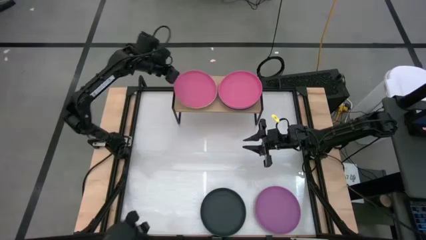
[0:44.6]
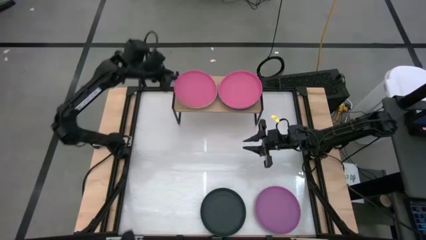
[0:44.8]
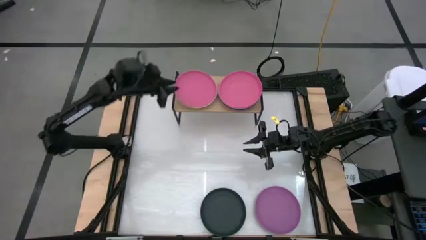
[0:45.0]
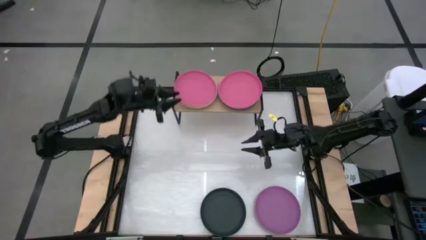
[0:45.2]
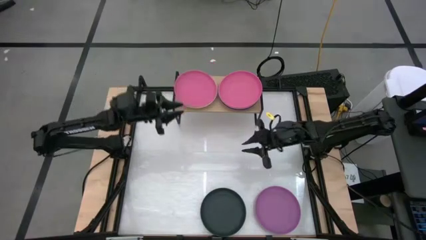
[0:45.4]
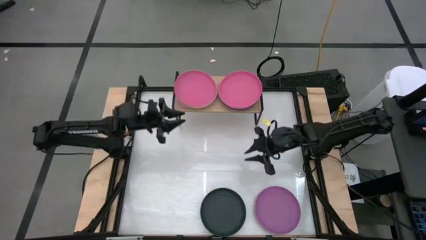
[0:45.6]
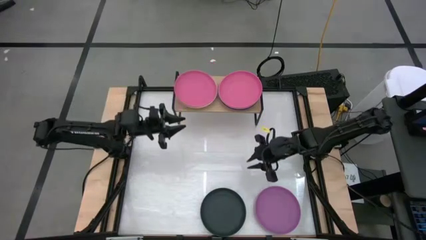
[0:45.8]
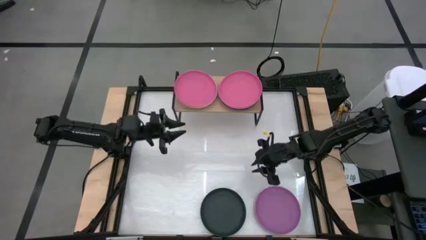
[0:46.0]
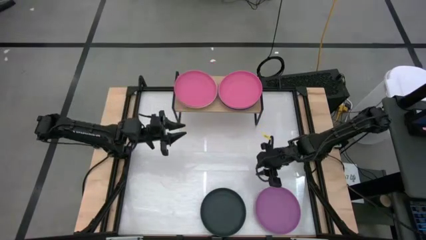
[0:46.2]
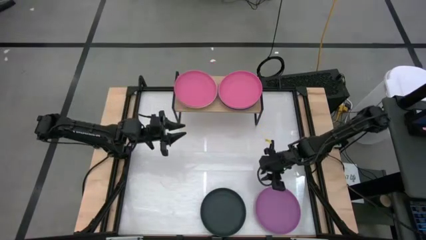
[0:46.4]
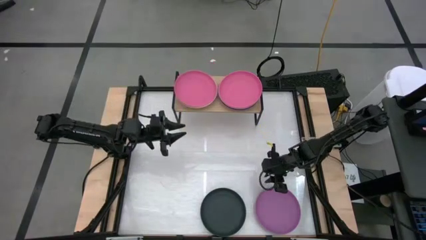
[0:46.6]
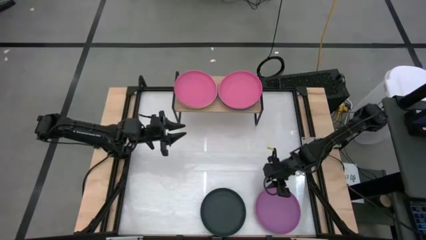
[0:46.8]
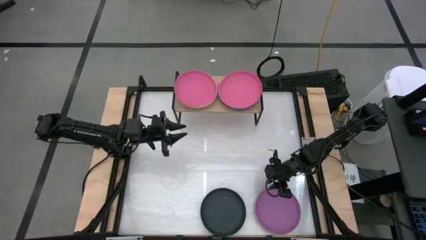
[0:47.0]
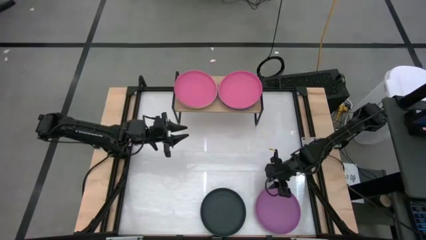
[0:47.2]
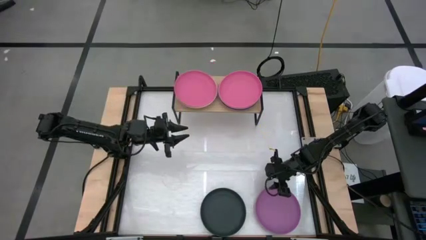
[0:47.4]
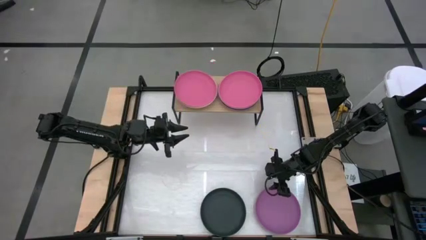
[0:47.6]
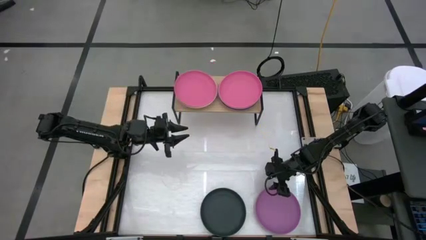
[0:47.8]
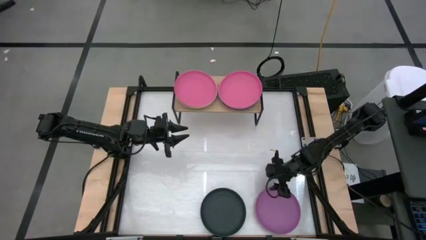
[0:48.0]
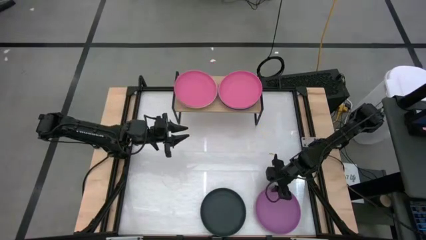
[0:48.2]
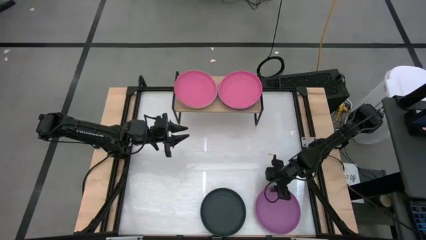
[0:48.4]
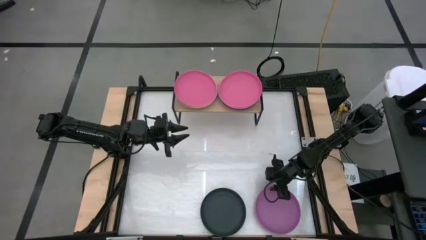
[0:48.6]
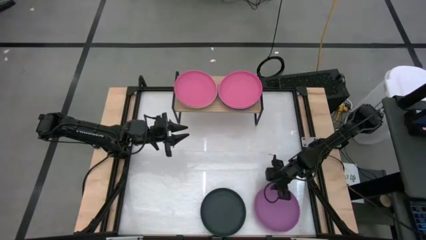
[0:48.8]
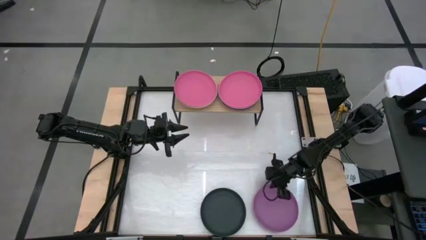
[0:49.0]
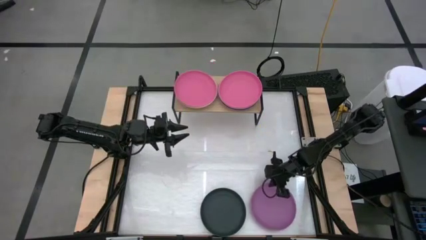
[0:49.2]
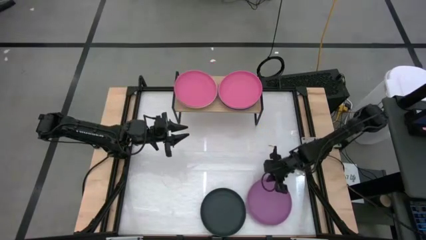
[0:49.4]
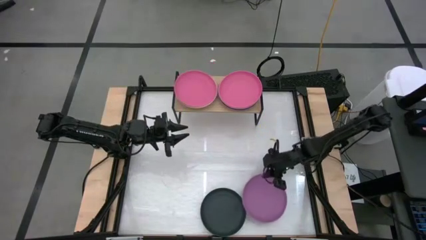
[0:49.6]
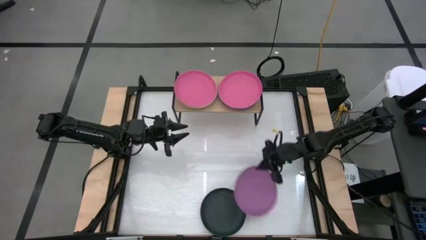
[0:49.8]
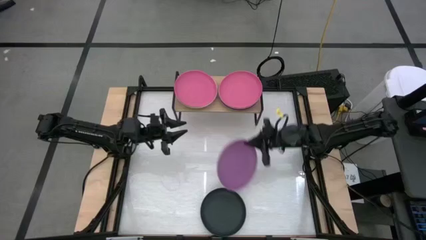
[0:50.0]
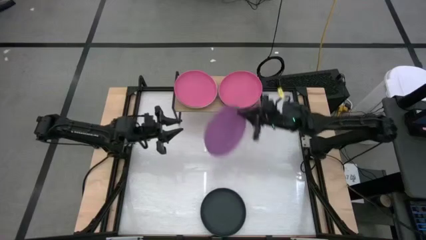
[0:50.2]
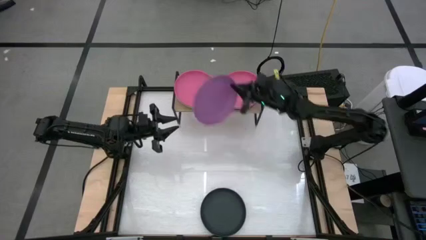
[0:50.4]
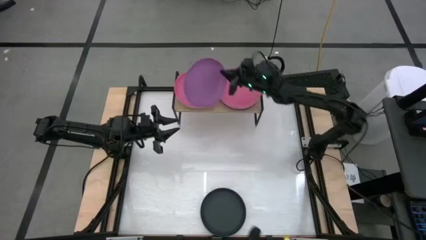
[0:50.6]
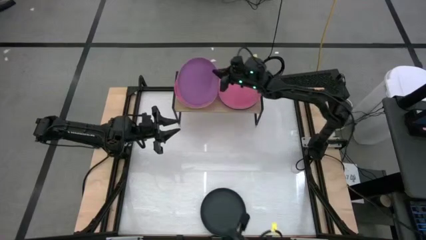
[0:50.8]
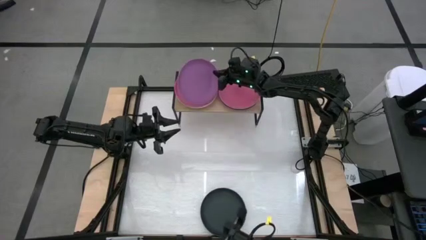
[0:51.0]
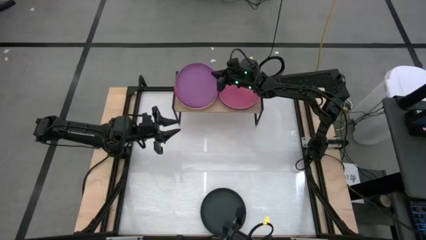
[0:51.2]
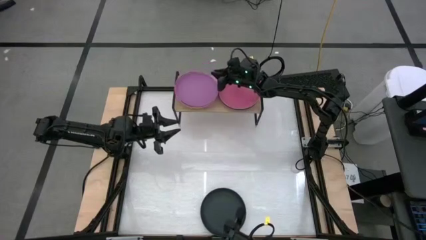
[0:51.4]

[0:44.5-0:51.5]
Task: Place and stack plates onto a shelf
Stack the violet plate on top of the left pink plate on the shelf

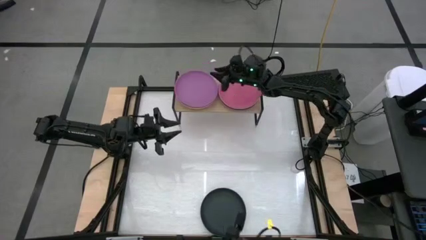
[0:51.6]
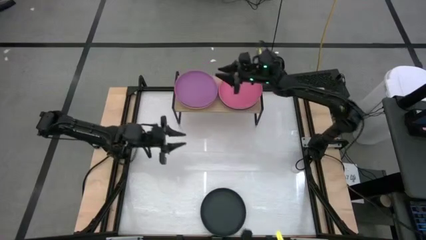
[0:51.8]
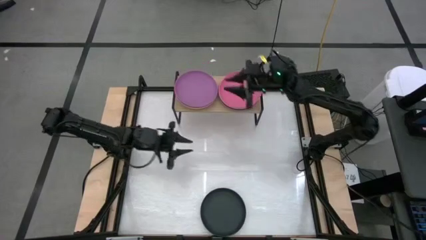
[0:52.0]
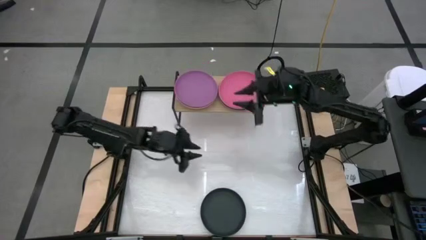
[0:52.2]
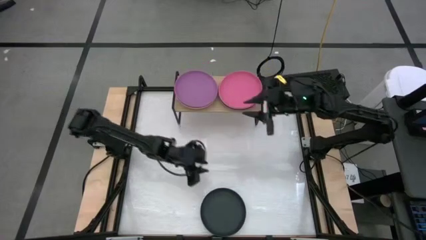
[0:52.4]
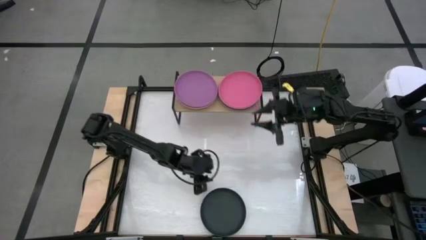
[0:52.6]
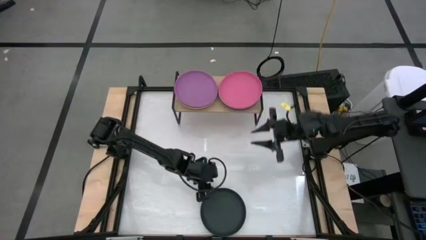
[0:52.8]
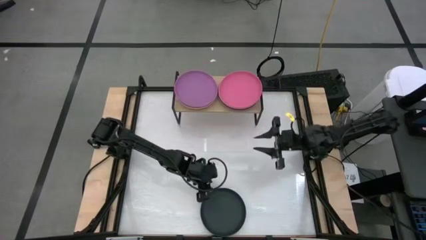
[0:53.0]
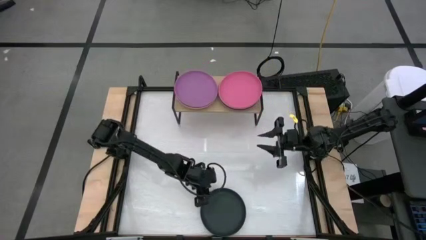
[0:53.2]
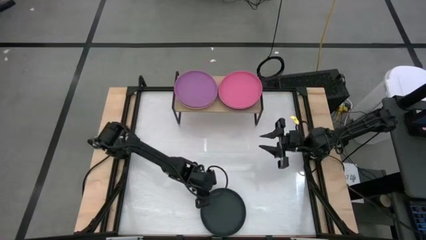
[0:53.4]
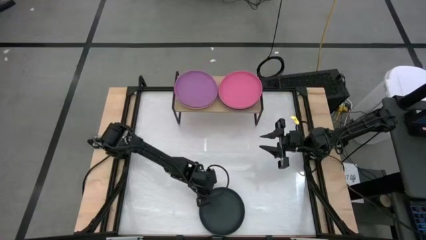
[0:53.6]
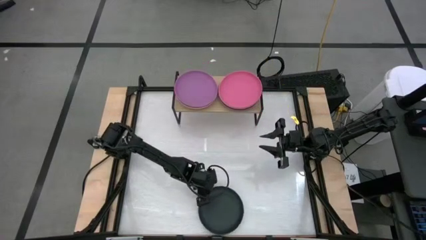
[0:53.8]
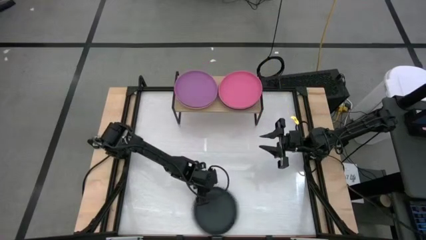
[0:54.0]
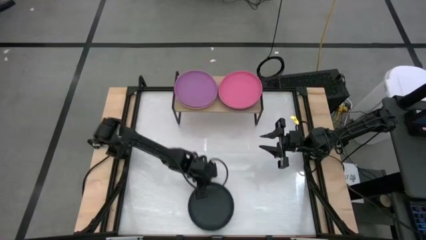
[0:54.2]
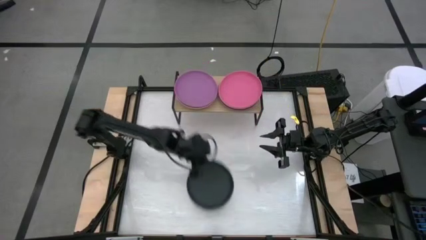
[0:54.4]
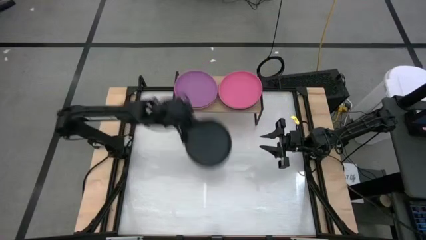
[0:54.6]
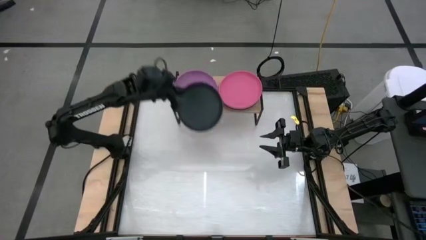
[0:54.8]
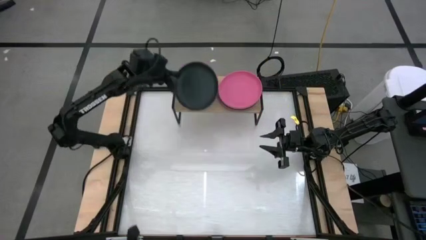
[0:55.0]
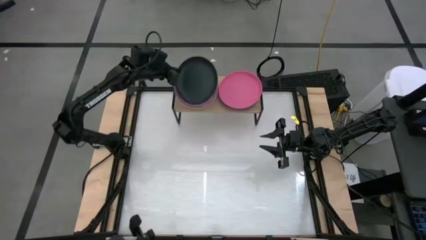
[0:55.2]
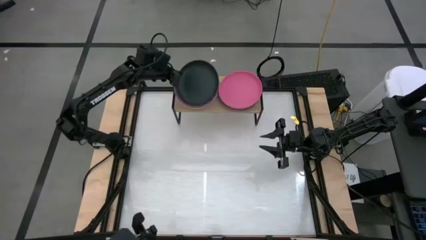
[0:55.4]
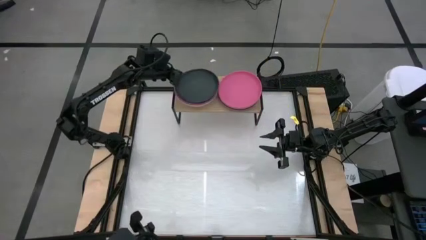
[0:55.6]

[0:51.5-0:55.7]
Stack the black plate on top of the violet plate on the shelf

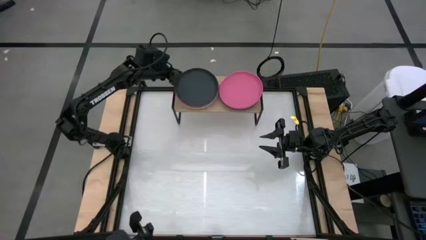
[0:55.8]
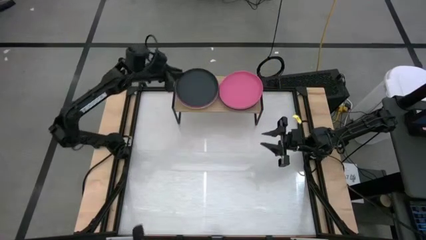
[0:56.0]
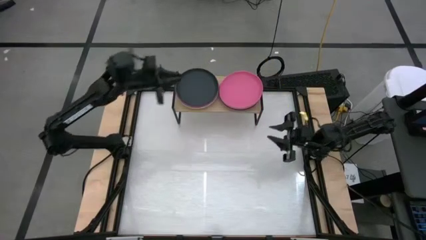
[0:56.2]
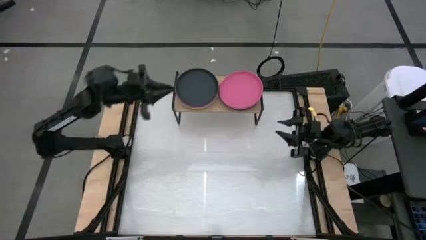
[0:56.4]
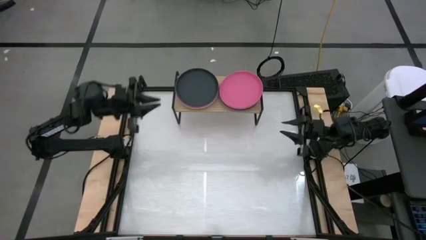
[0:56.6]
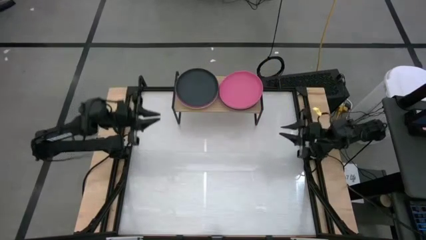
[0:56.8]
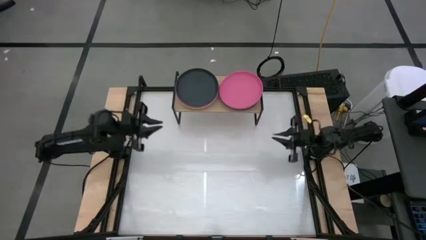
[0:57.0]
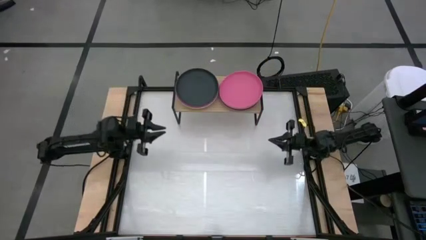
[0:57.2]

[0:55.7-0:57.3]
Return to Home Position

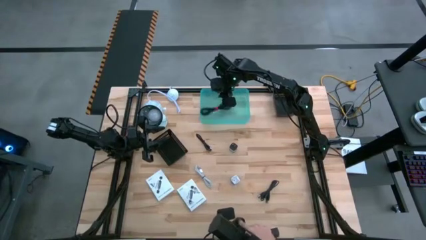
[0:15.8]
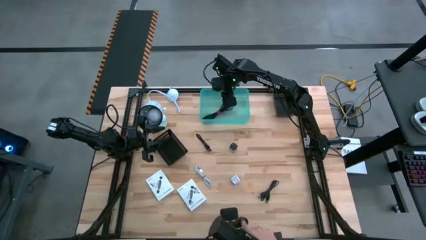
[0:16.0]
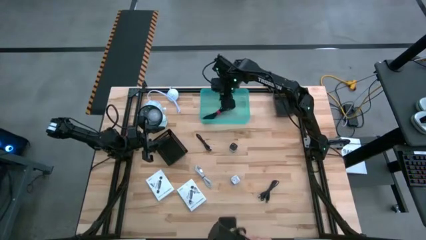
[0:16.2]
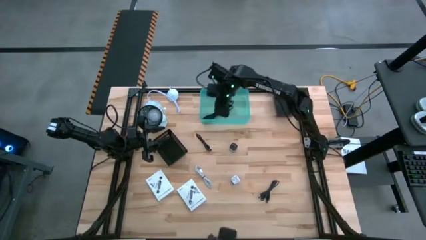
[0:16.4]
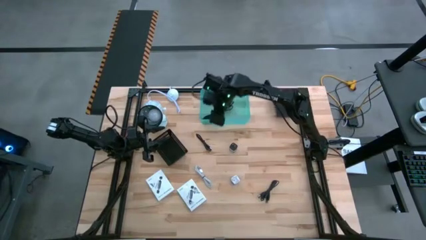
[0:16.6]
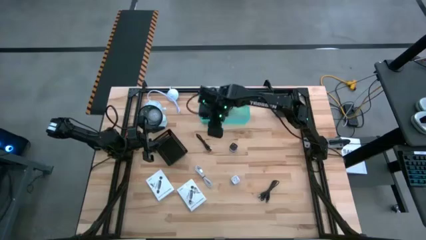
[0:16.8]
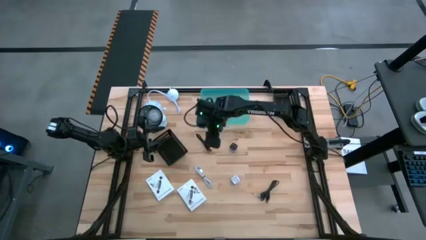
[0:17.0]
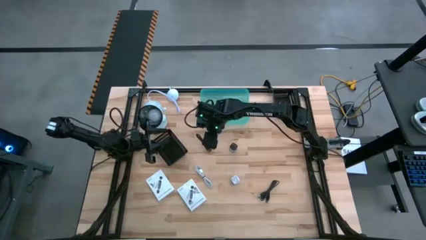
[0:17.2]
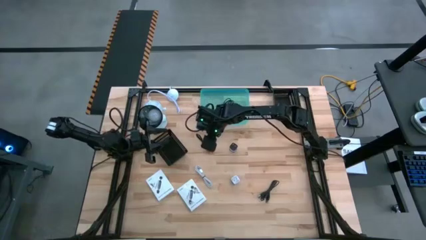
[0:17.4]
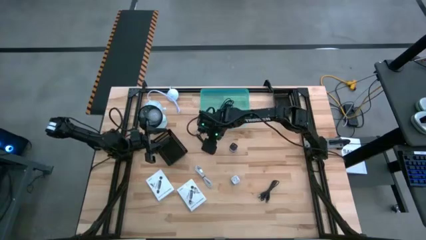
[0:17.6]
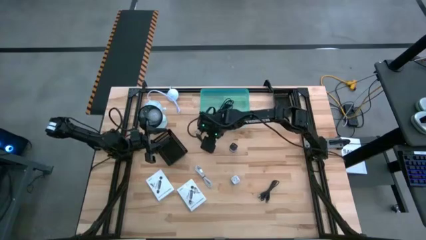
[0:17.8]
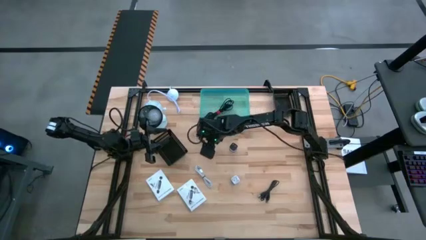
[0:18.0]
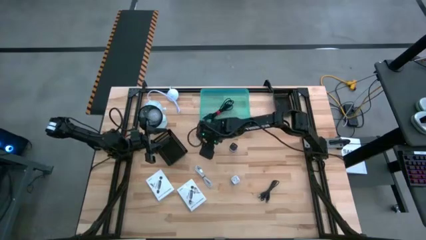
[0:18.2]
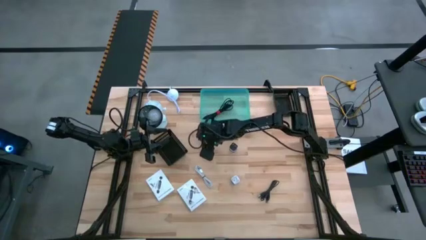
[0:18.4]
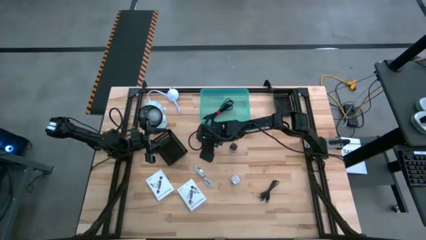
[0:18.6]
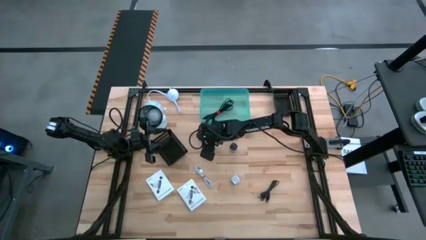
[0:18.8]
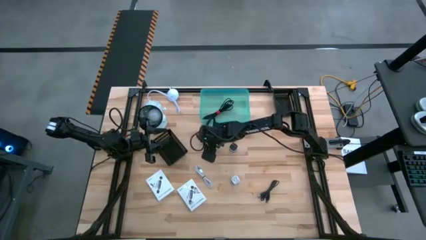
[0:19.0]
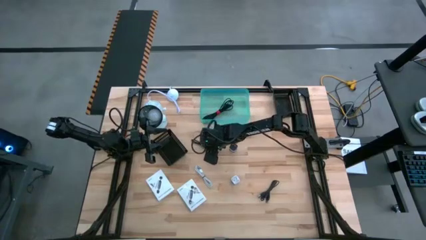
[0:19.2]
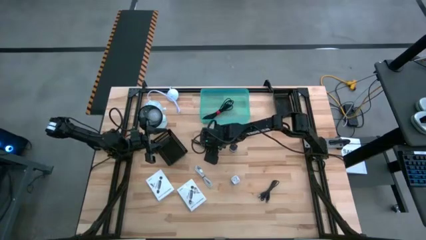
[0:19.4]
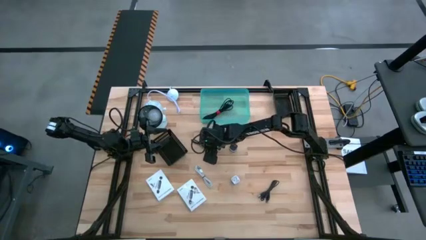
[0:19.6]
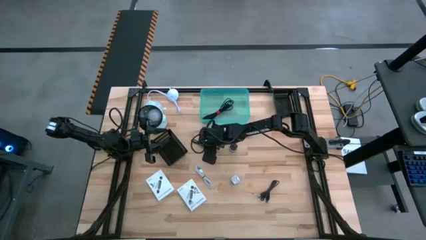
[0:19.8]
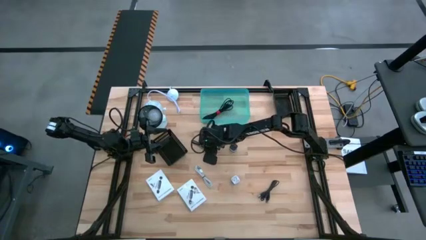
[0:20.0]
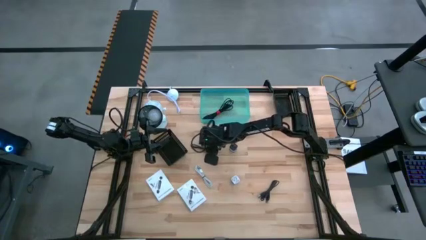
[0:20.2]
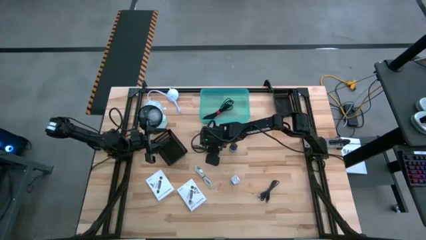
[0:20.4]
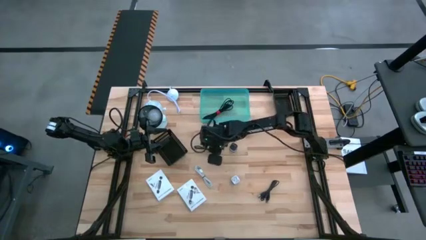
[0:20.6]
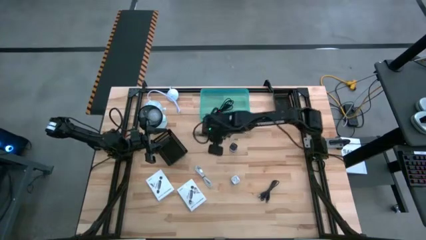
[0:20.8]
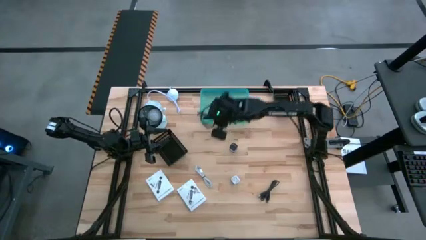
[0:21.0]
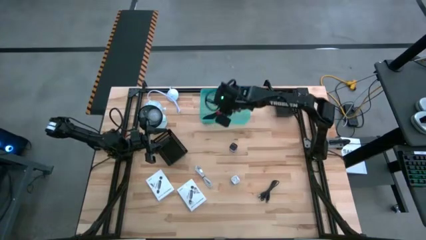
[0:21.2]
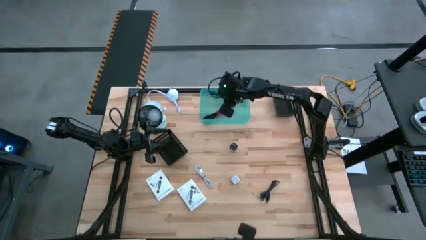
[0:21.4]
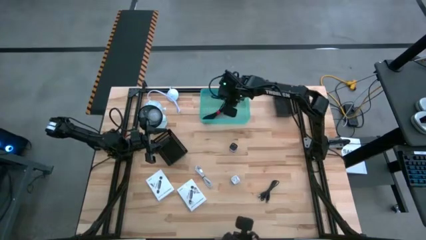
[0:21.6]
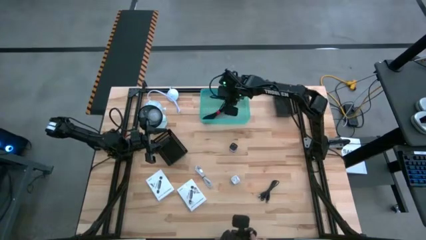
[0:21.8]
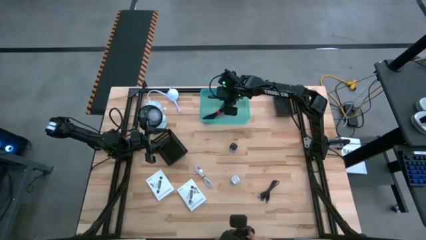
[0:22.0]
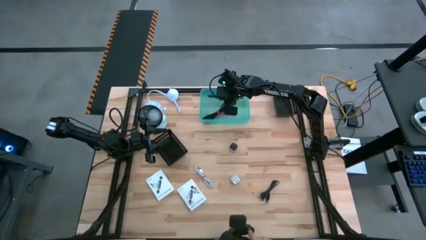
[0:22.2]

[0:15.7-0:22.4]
Task: Pick and place items into bin
Put the left black charger cable into the green bin
